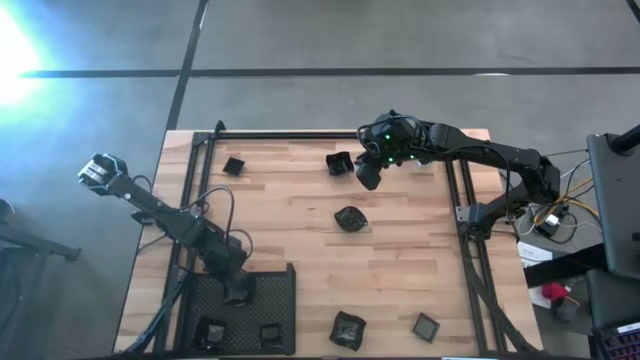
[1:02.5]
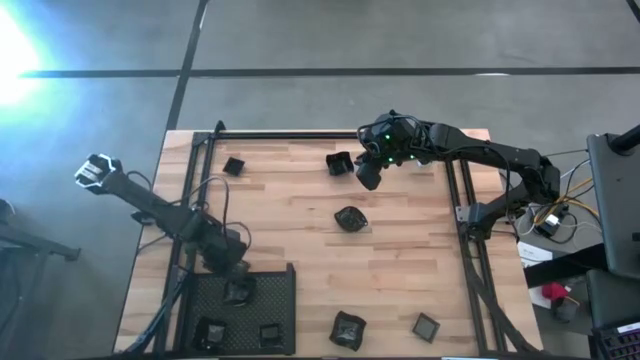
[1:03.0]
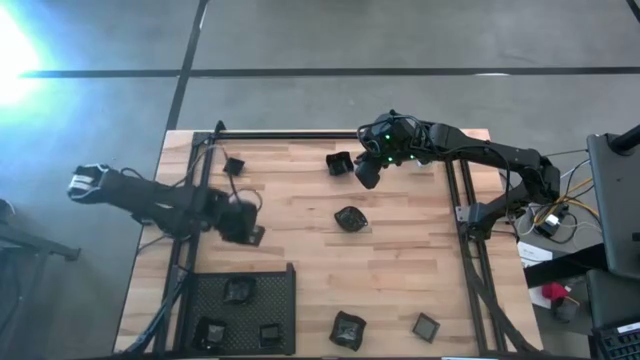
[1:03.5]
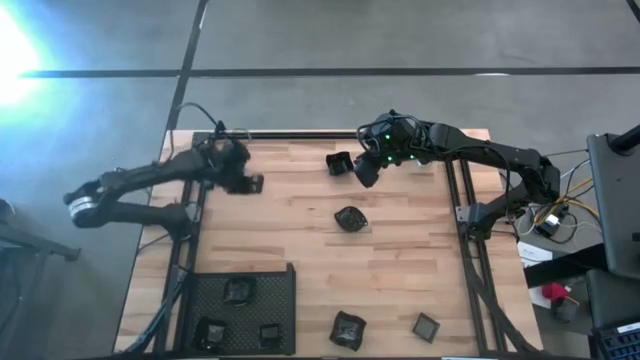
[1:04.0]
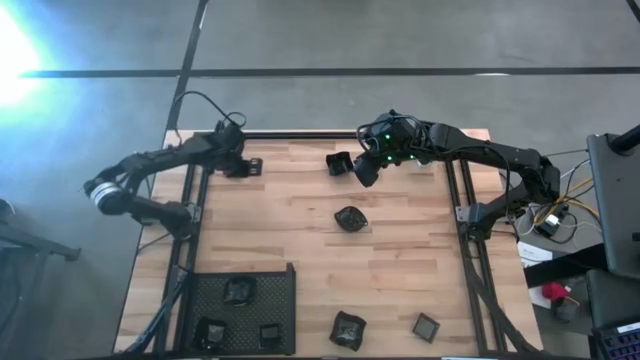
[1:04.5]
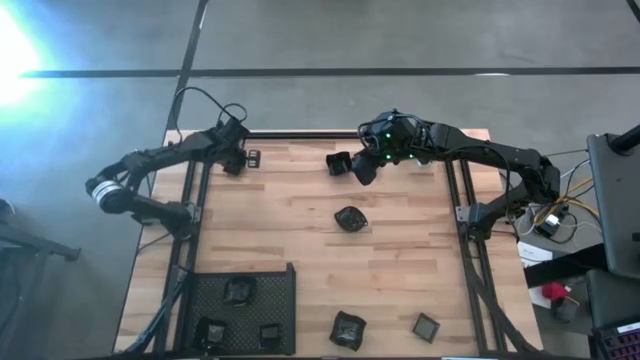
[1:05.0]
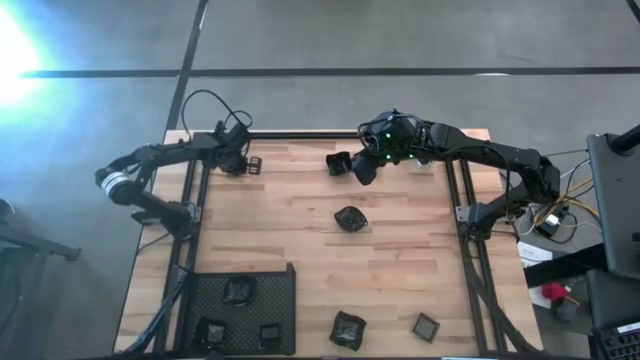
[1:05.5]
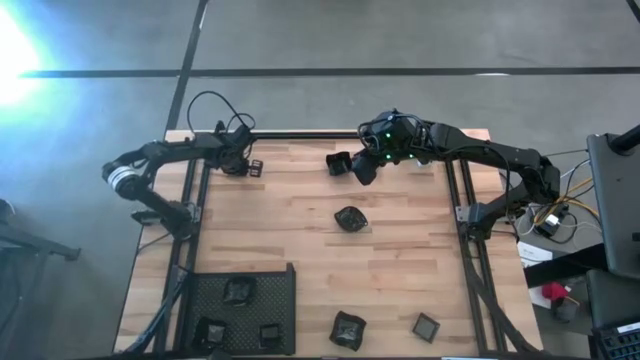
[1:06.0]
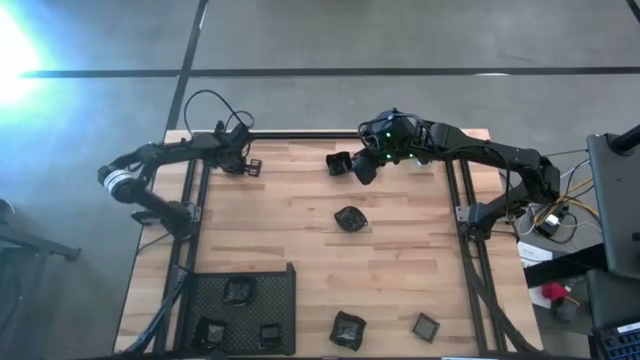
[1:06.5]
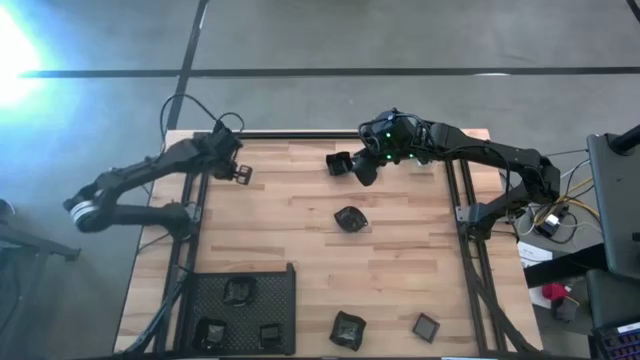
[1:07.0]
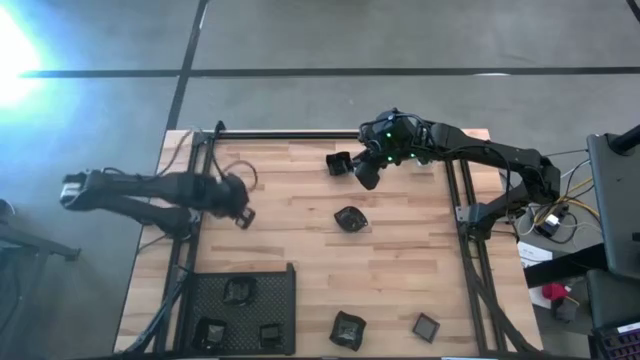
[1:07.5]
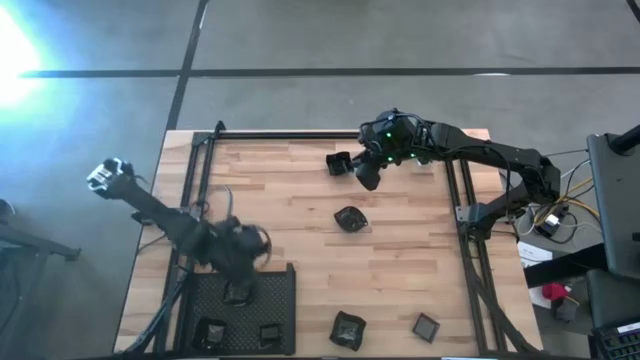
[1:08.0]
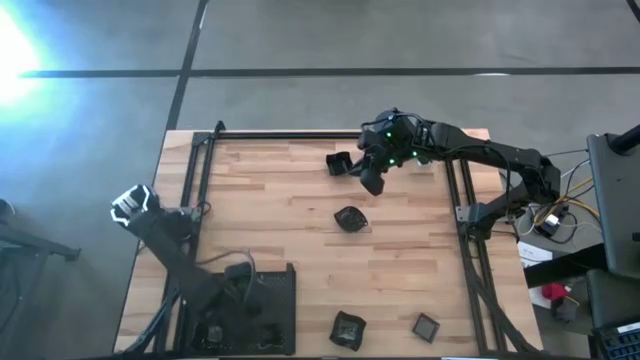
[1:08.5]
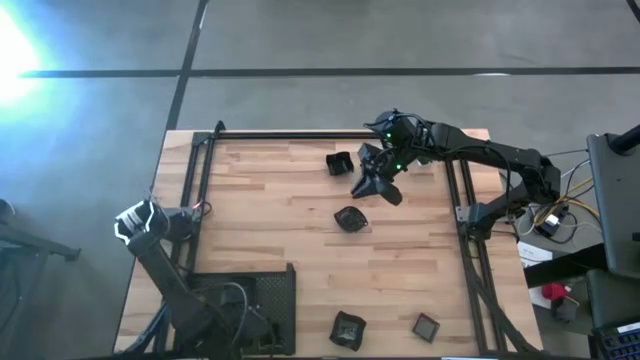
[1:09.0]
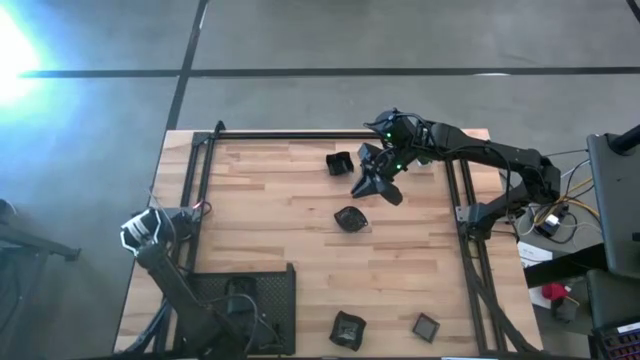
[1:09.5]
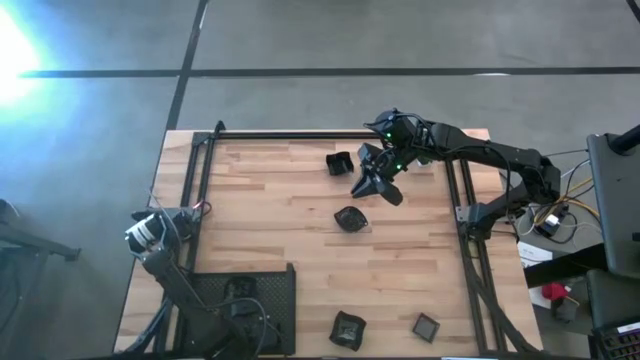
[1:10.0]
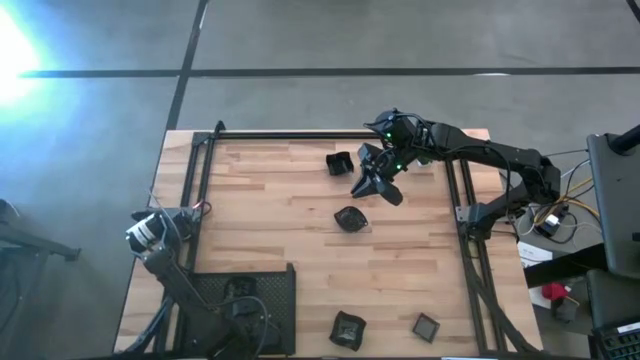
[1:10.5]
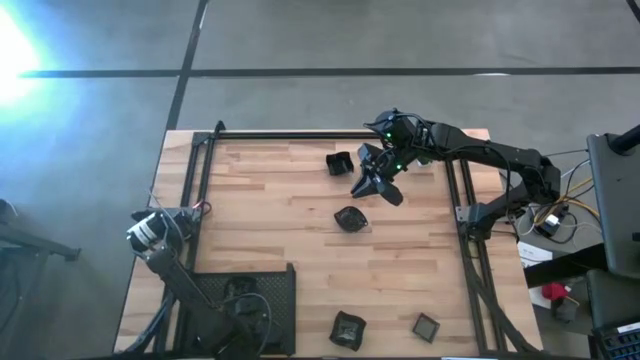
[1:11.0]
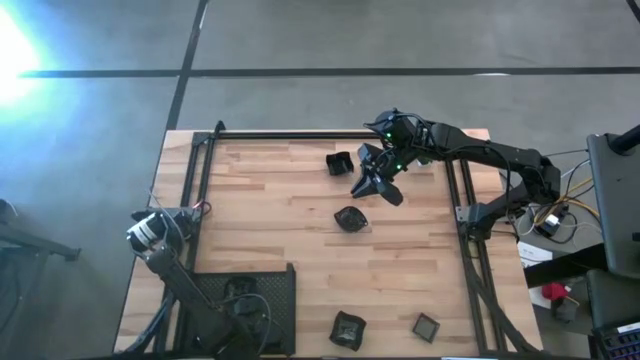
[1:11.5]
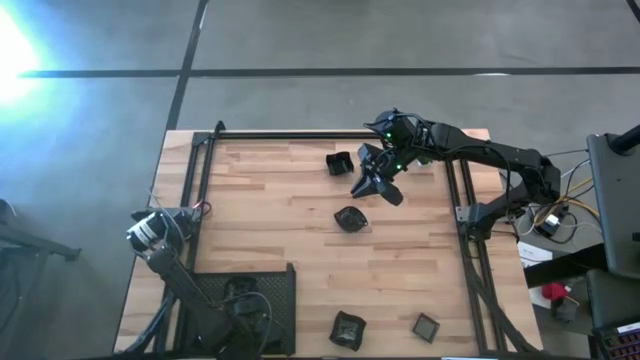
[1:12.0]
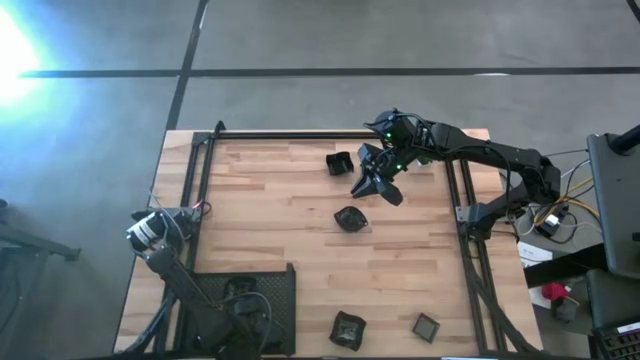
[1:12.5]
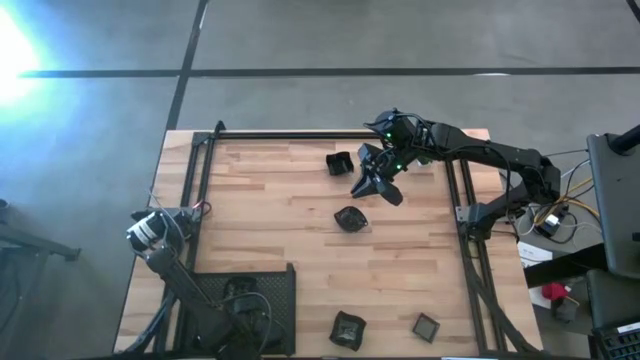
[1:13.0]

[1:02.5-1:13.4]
Task: Pick & Place Mini shaped plates
Stack the black square plate on the black square plate on the shelf

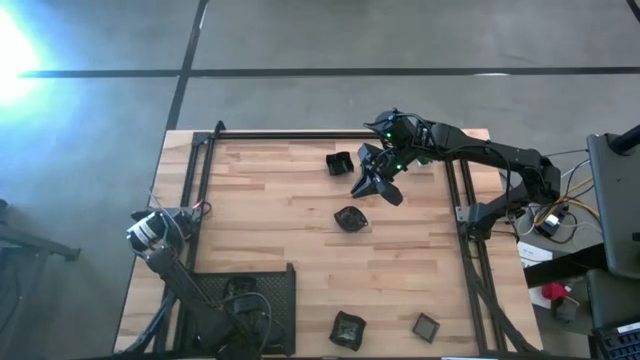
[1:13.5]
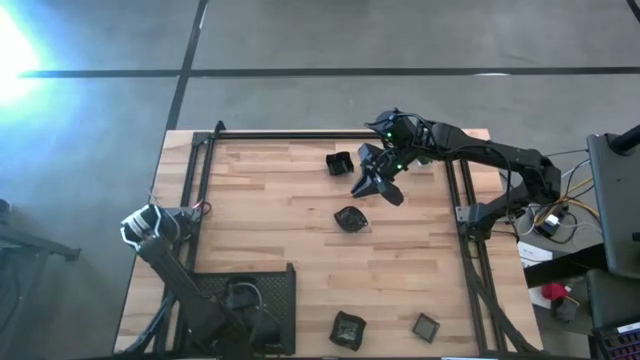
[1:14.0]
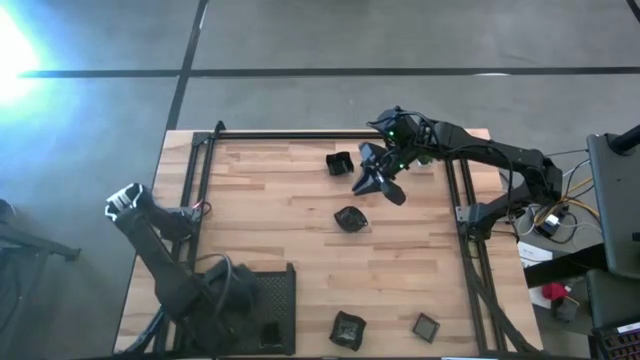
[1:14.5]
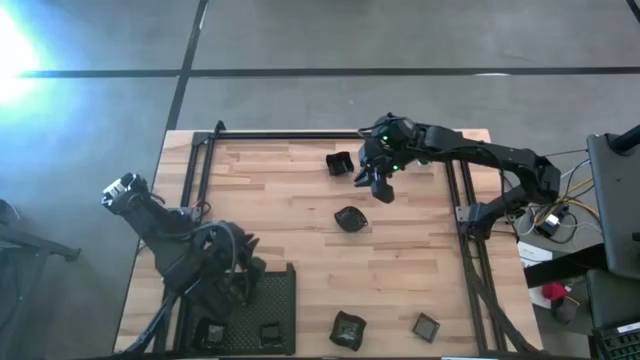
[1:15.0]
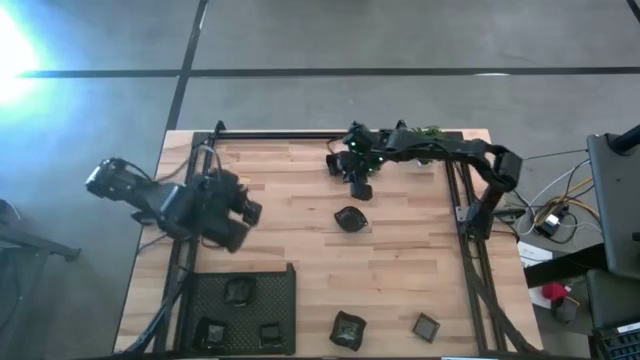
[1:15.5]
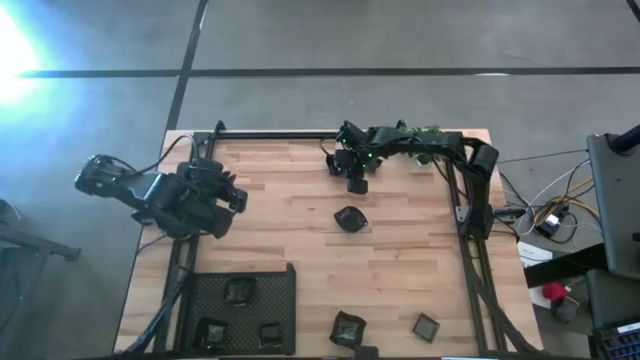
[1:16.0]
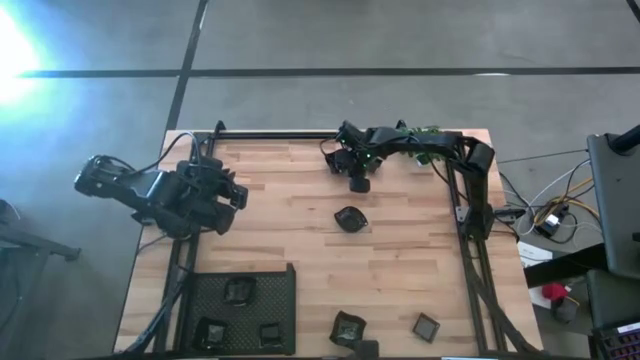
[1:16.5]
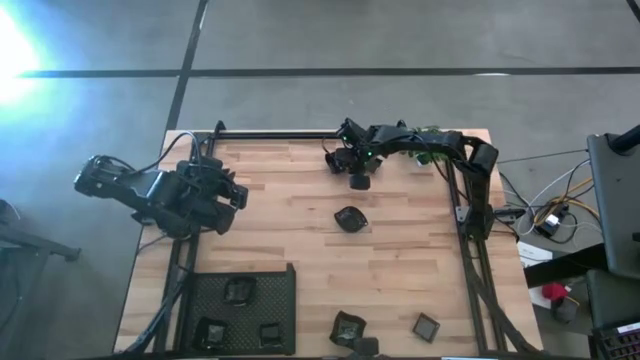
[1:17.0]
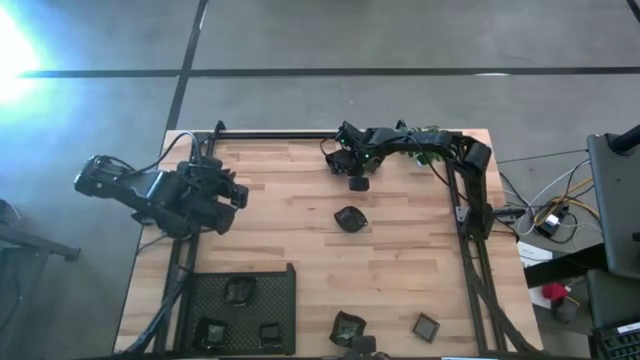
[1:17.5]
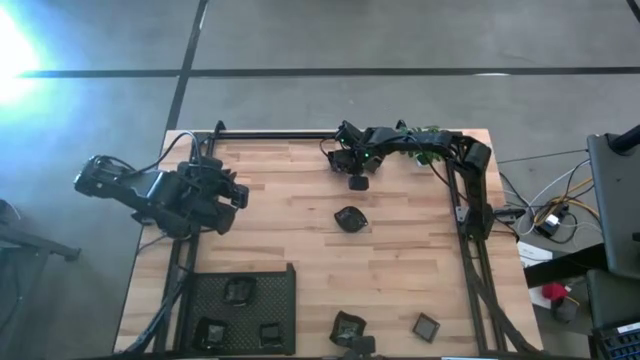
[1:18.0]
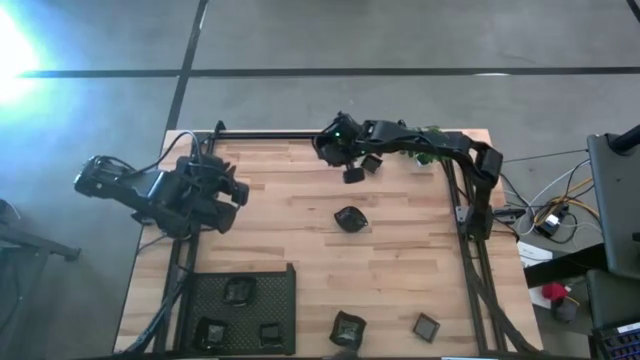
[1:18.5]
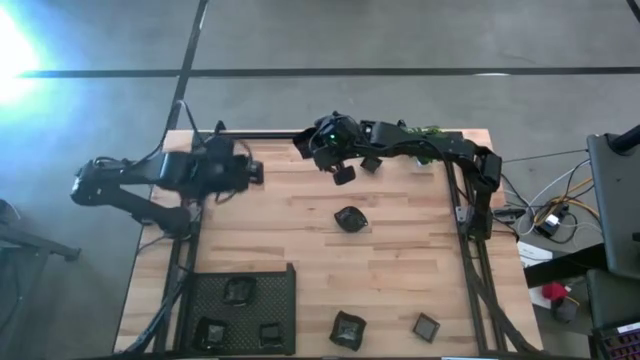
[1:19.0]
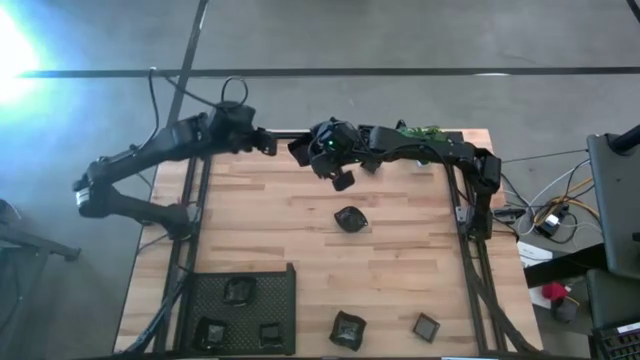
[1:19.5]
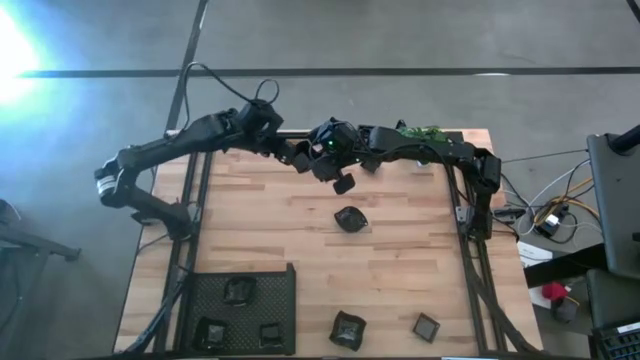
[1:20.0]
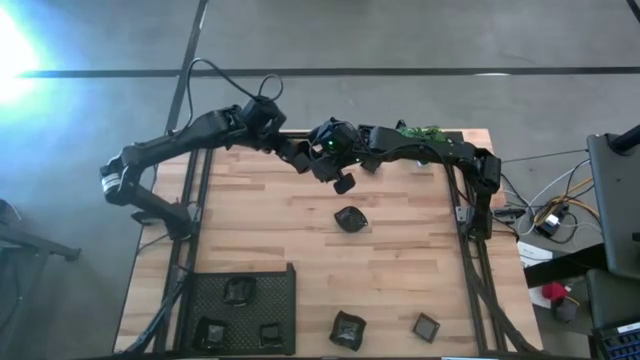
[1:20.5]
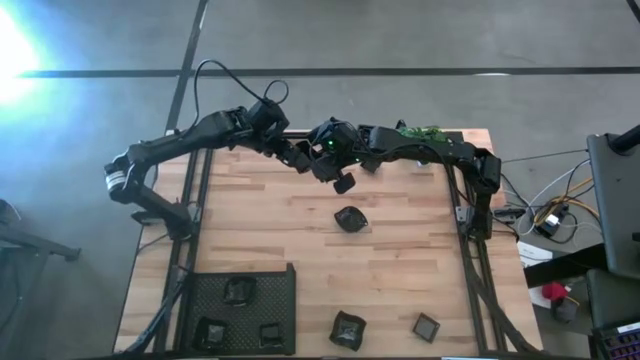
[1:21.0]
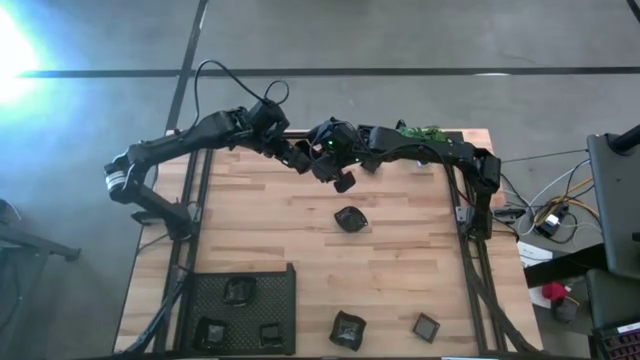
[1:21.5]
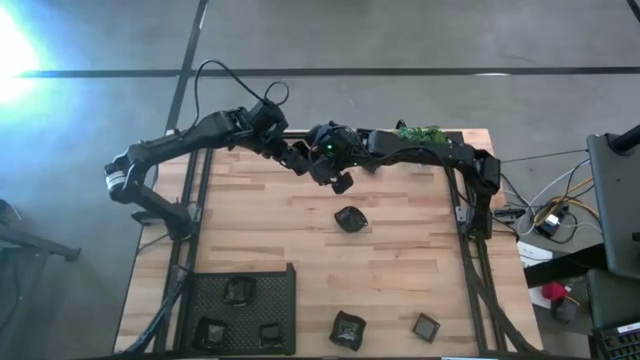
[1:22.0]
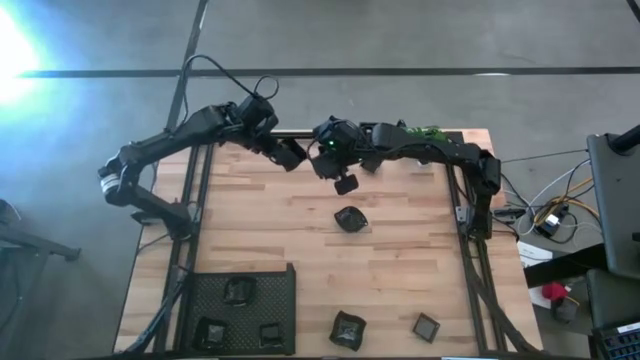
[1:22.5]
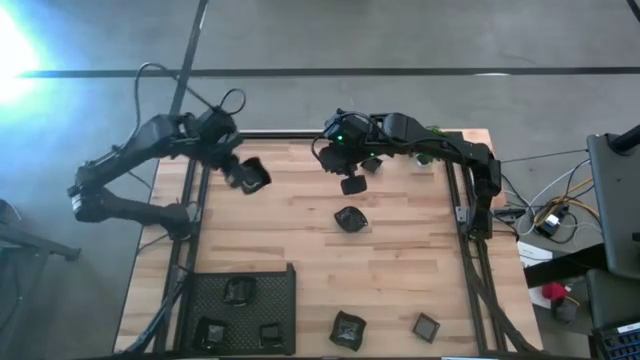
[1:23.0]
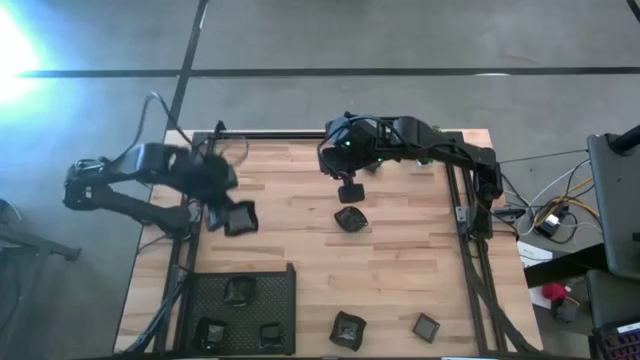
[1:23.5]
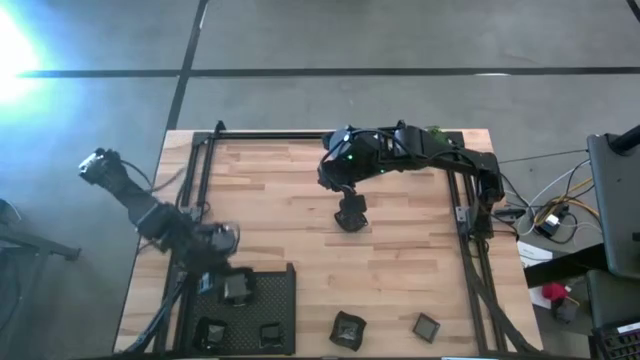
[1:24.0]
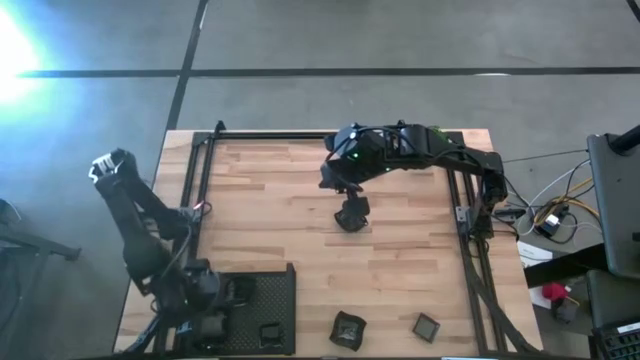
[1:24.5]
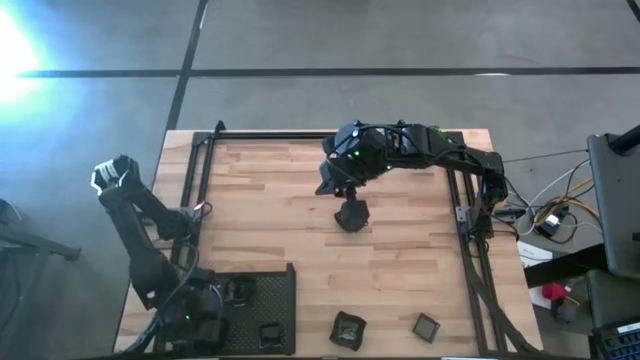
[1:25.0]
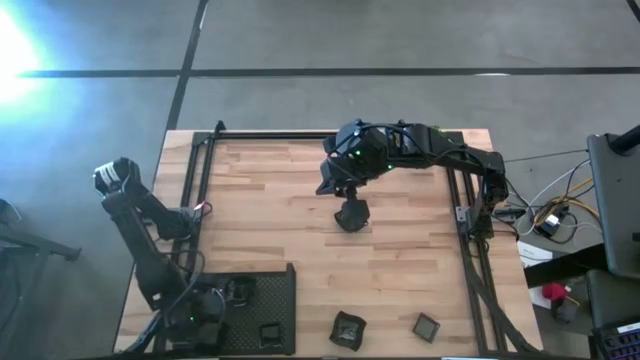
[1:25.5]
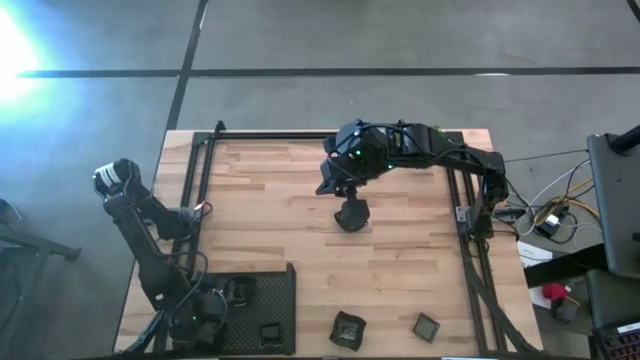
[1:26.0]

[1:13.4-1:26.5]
Stack the black distorted square plate on the black distorted square plate on the shelf
